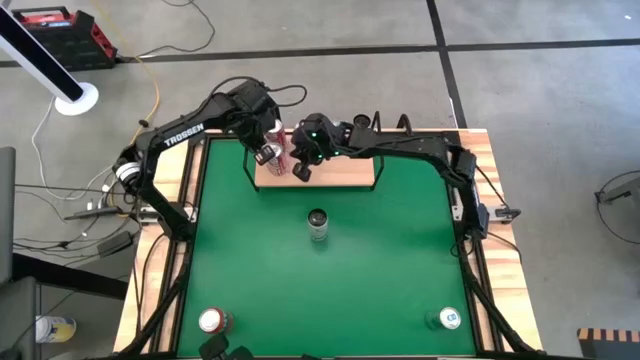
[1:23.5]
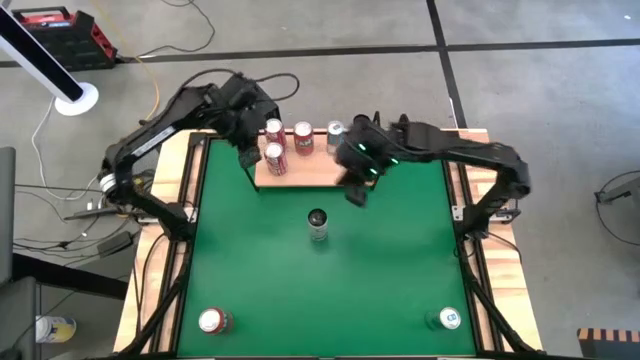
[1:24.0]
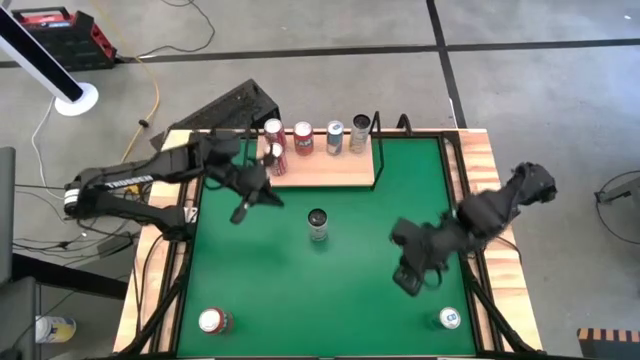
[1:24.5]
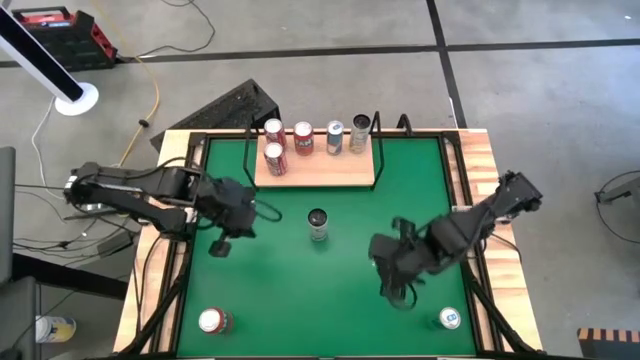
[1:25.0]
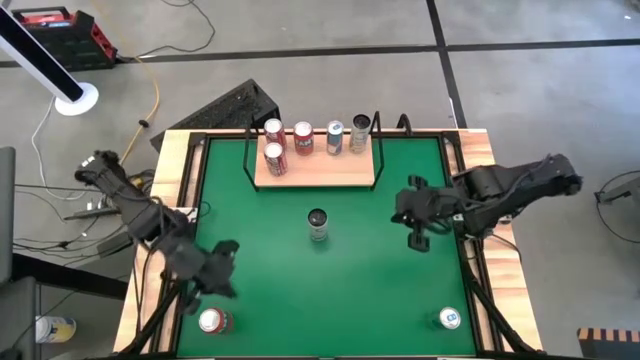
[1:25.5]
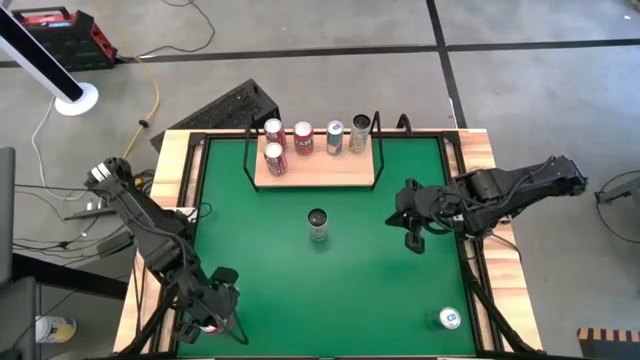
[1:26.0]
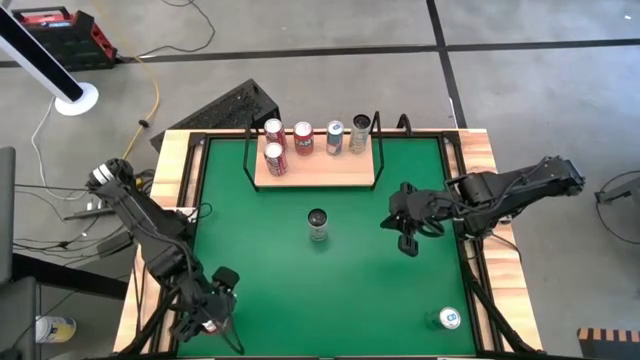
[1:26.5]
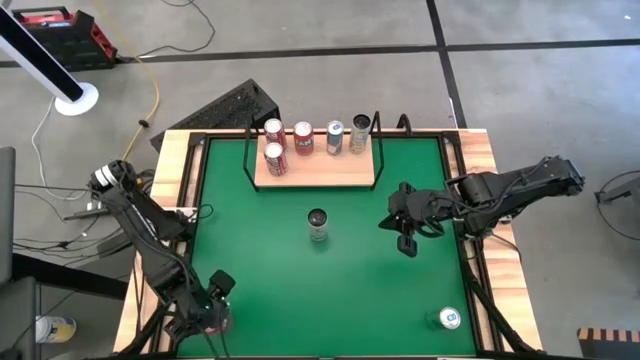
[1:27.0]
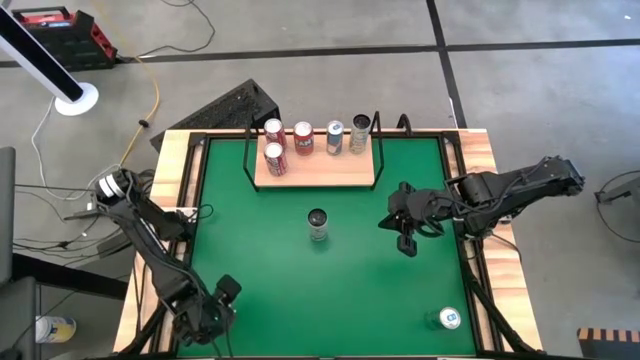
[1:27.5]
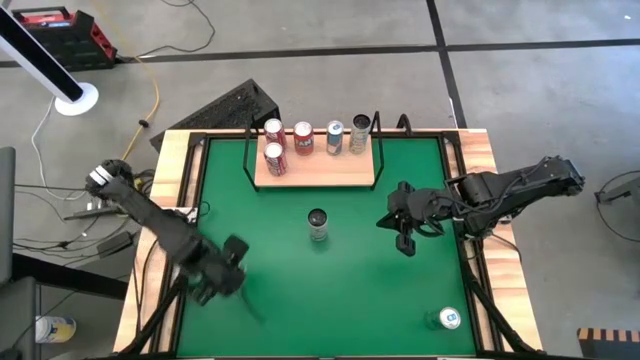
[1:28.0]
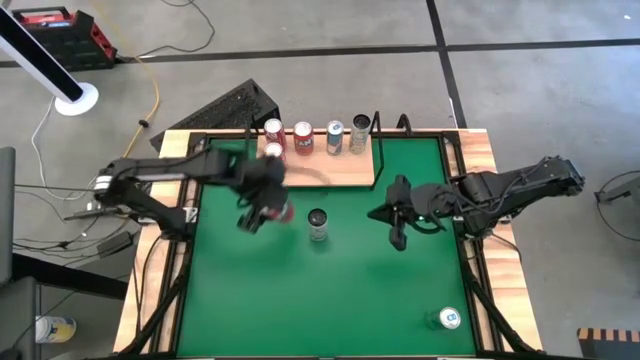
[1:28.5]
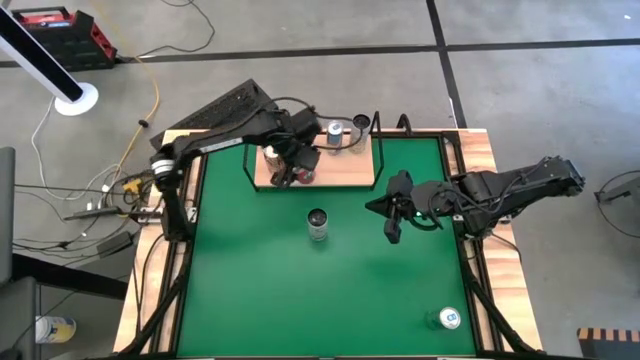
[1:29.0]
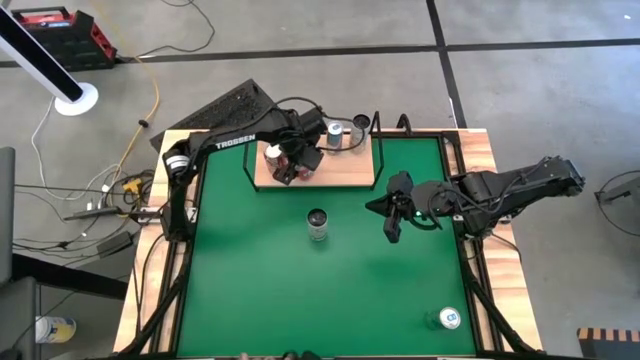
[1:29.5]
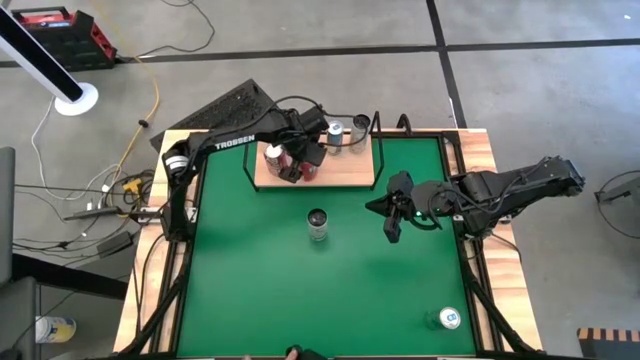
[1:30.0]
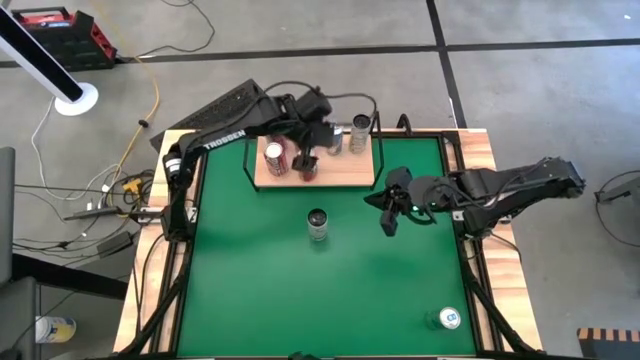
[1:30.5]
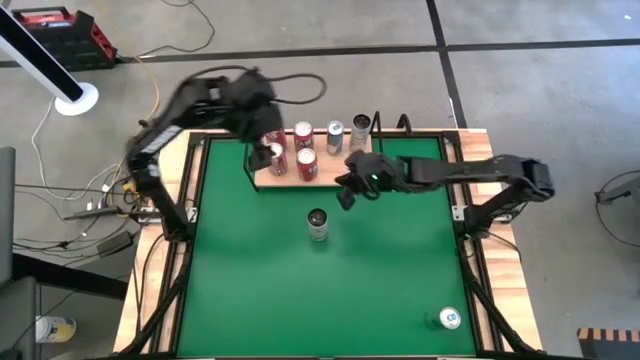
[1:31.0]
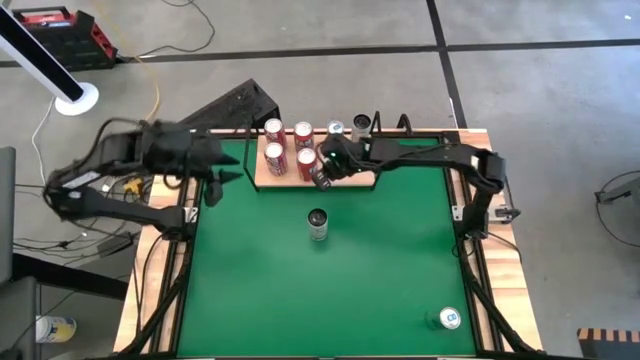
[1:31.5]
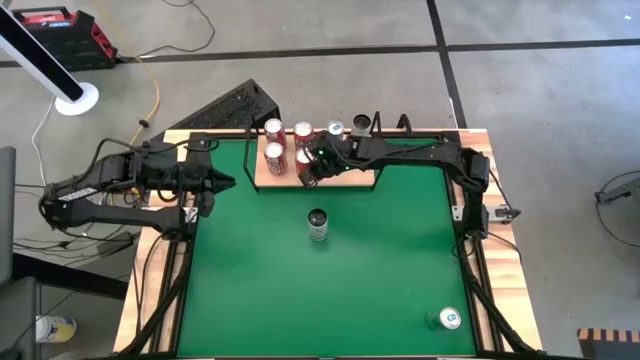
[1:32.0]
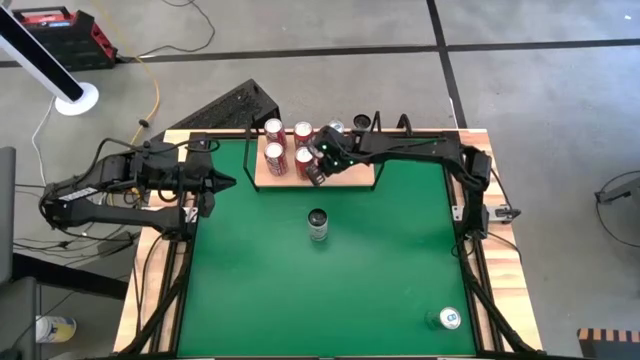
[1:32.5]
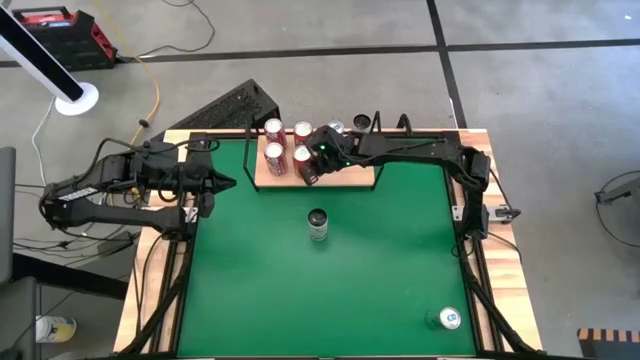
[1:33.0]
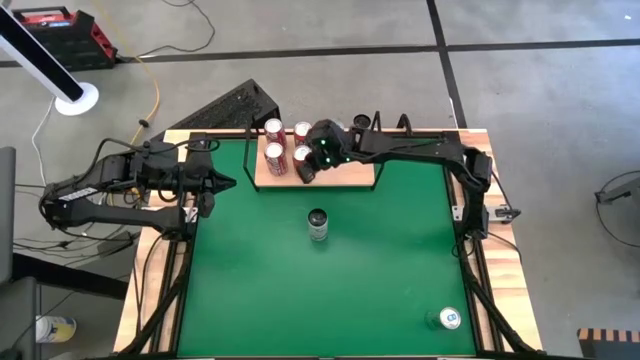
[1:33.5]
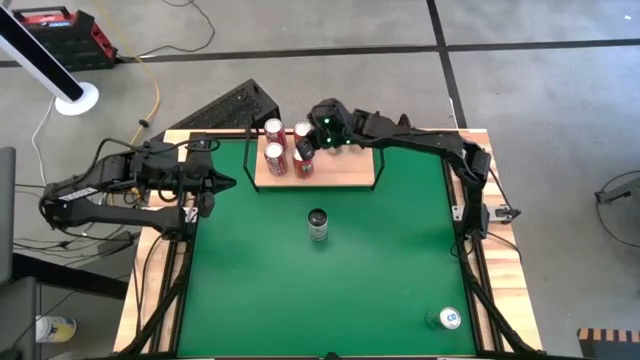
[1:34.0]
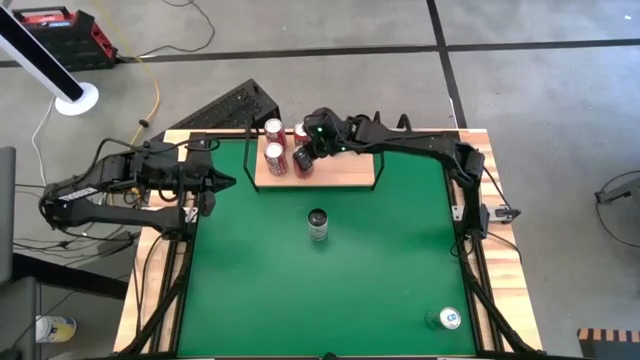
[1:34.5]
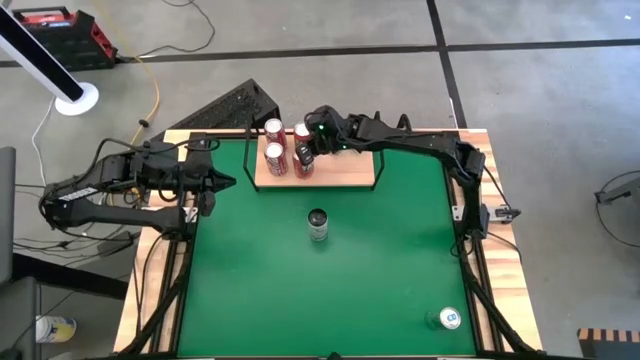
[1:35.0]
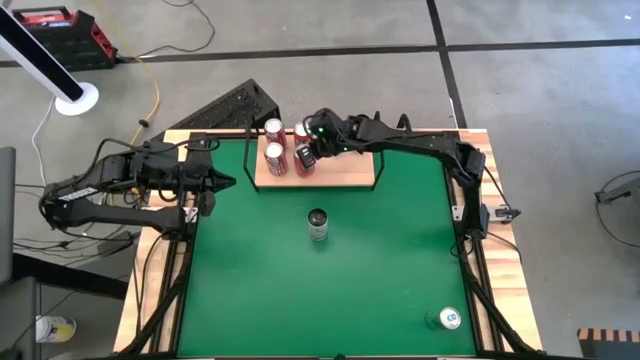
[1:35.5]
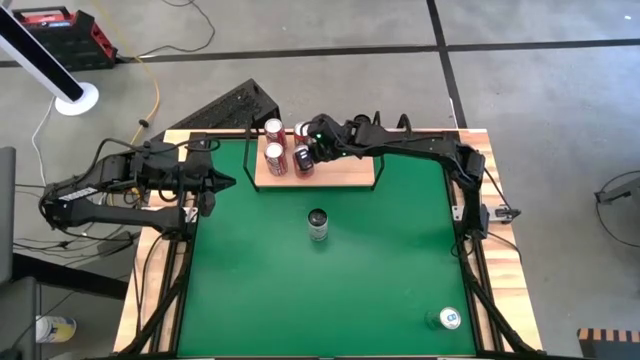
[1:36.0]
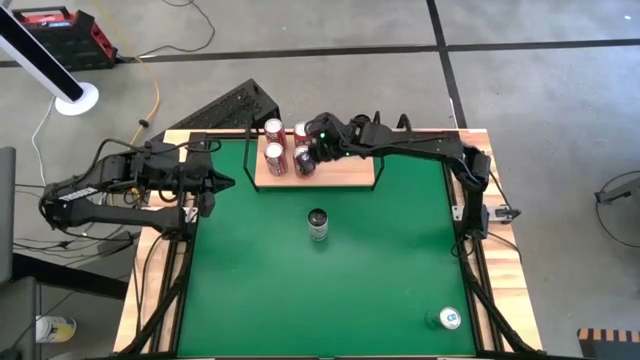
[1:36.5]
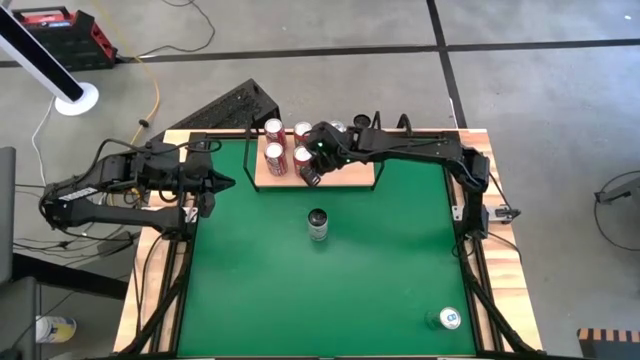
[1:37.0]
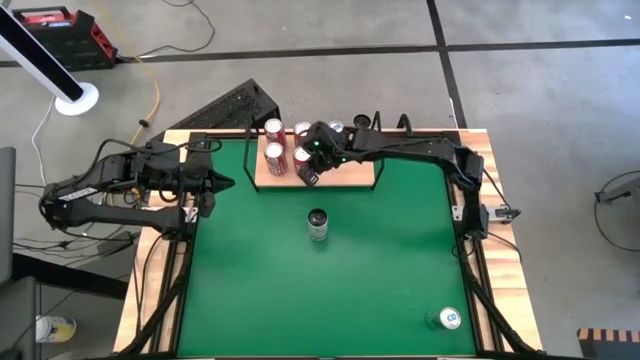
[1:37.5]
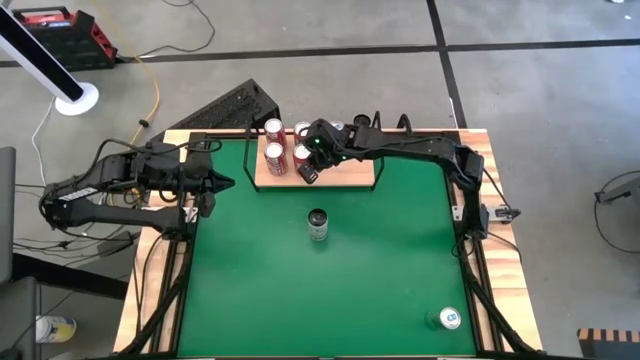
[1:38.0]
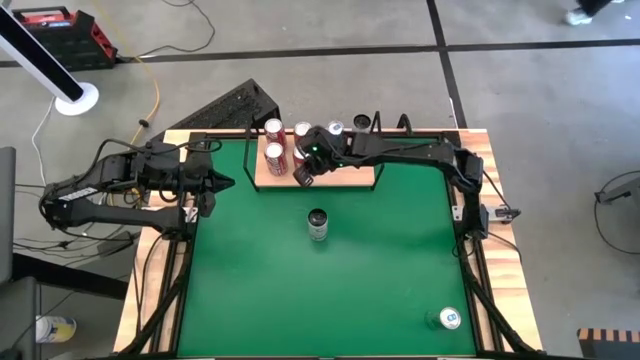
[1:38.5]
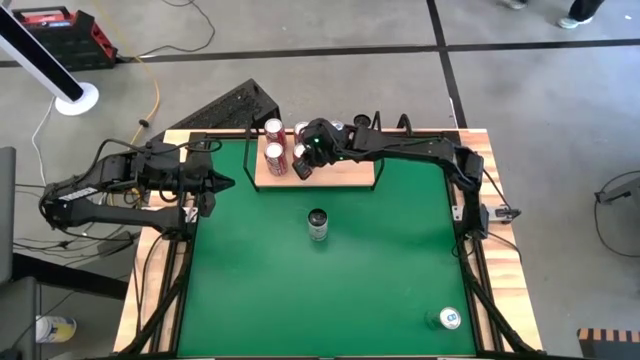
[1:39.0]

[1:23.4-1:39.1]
Task: Place canned beverage on shelf
Put the red soda can on the shelf aligned with the other red soda can

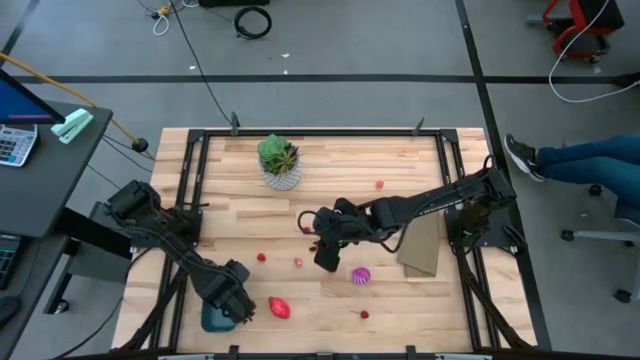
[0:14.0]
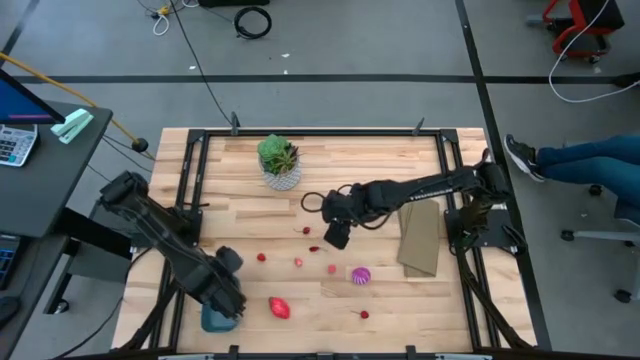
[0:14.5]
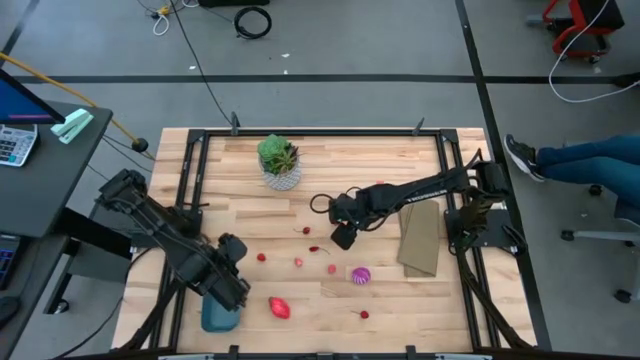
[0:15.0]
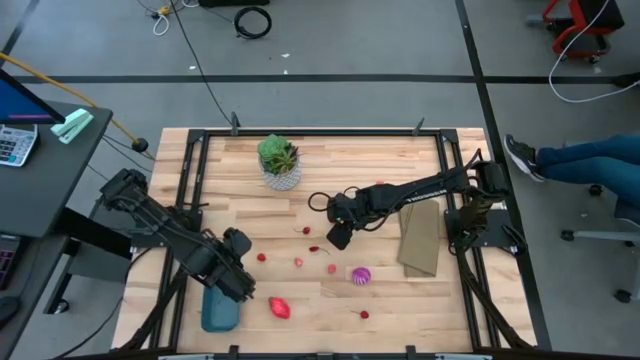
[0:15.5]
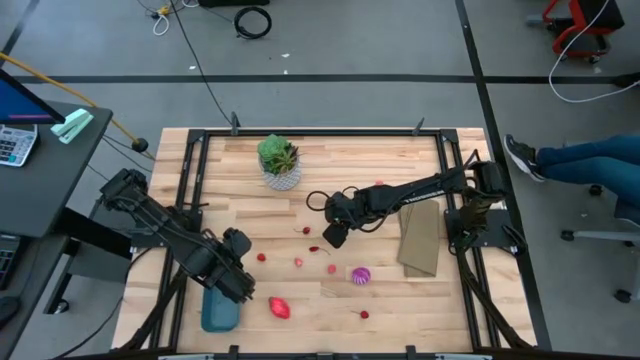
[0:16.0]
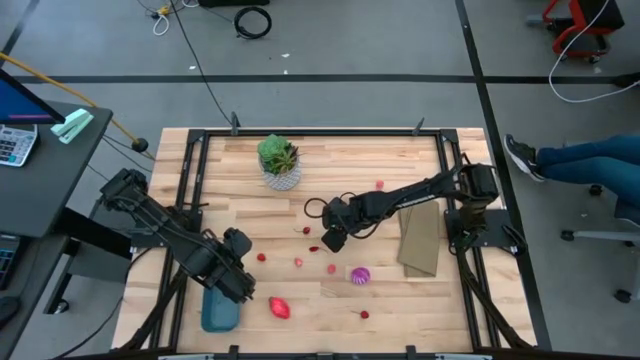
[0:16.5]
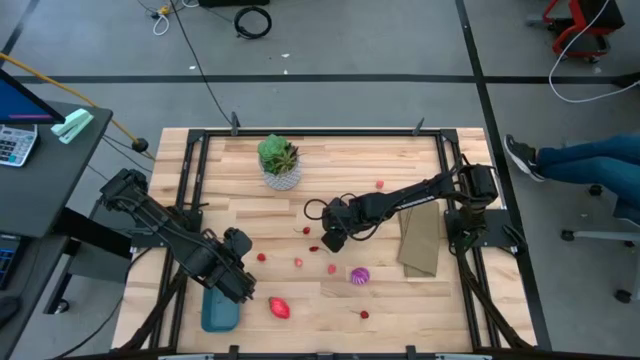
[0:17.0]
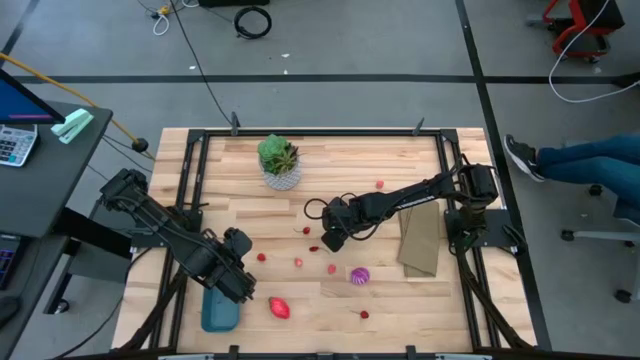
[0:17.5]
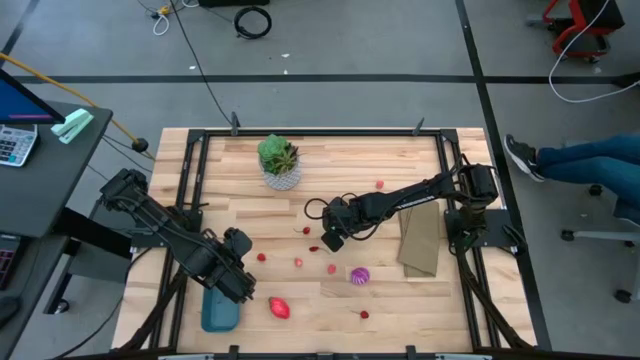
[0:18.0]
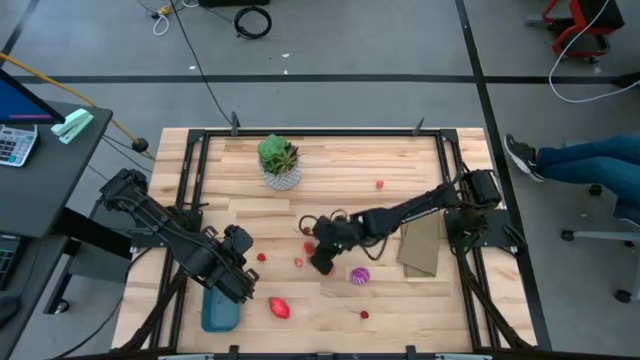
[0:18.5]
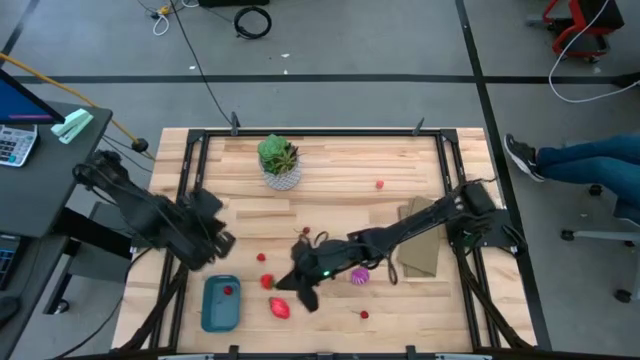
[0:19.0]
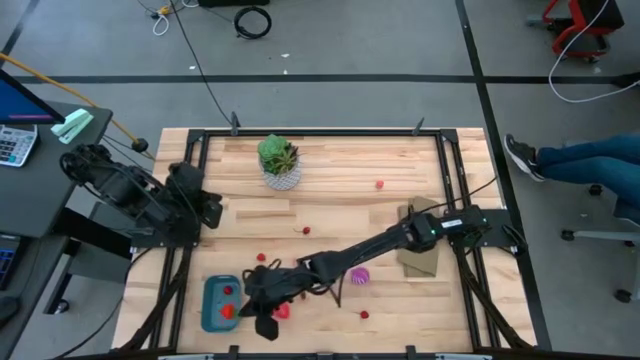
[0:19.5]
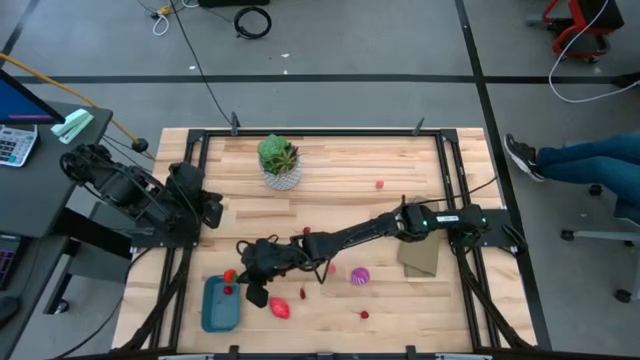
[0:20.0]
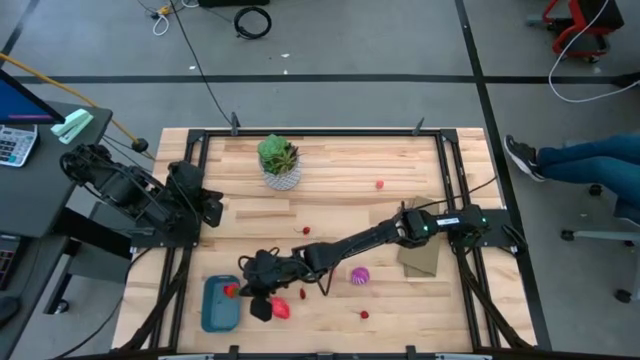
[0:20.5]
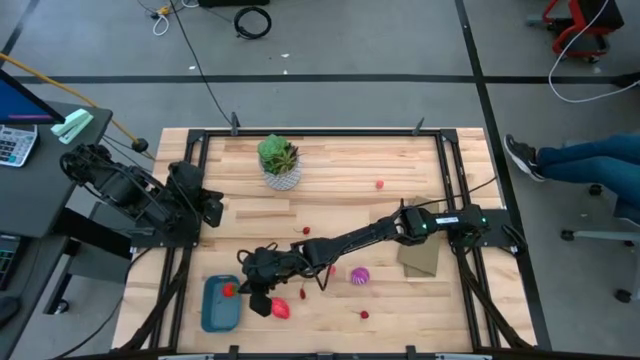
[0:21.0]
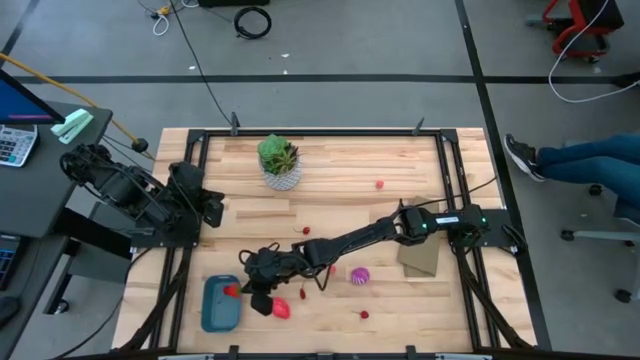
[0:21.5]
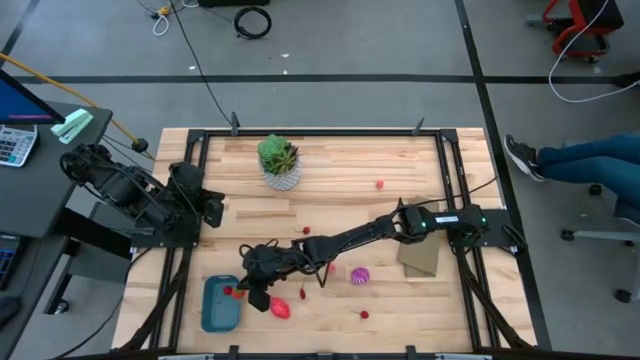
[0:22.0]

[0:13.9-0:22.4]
Task: Pick and placing Produce into tupperware
Put the strawberry into the bin
